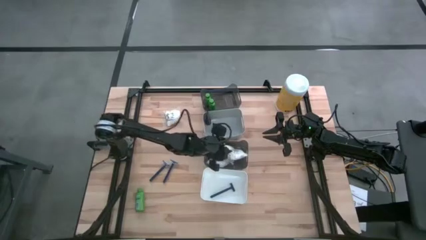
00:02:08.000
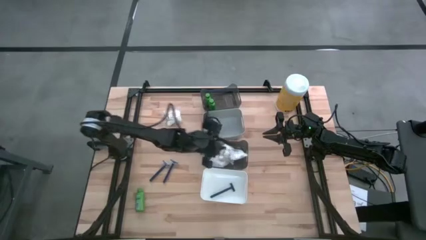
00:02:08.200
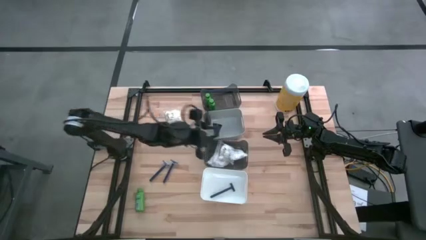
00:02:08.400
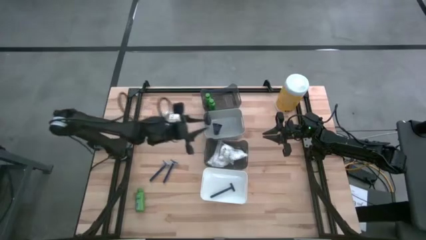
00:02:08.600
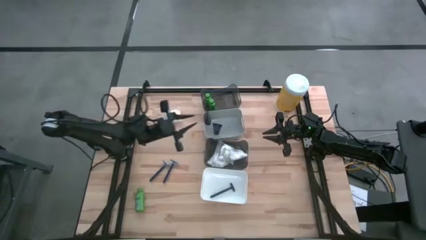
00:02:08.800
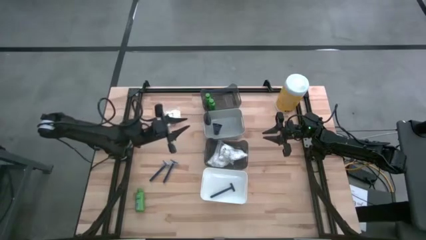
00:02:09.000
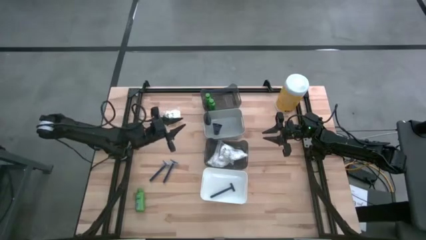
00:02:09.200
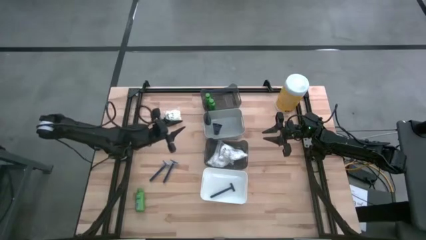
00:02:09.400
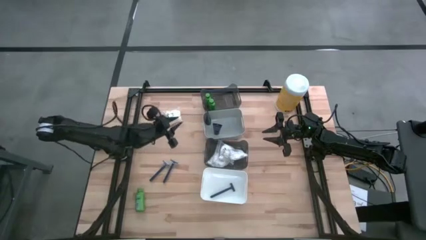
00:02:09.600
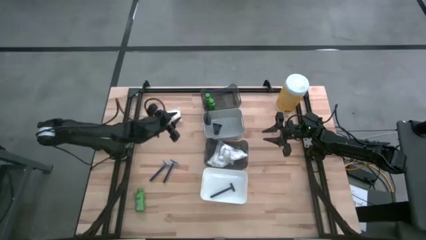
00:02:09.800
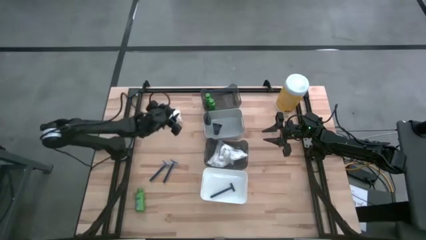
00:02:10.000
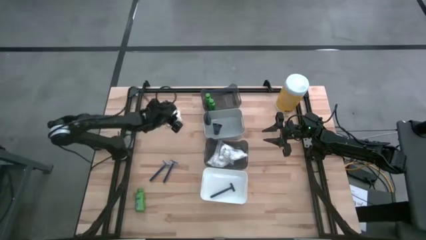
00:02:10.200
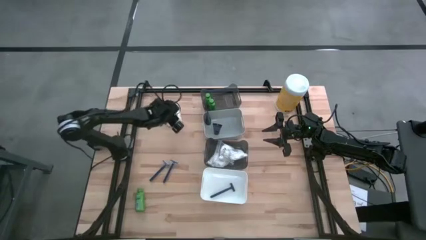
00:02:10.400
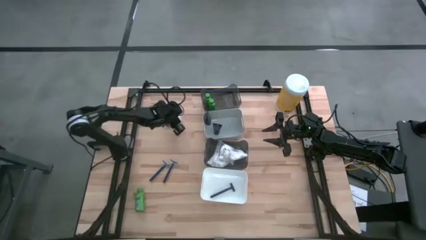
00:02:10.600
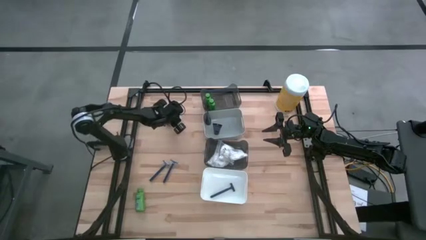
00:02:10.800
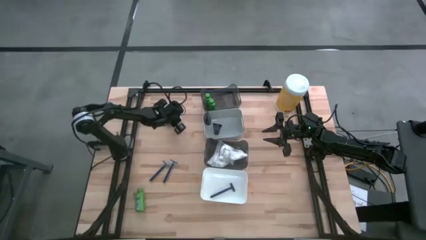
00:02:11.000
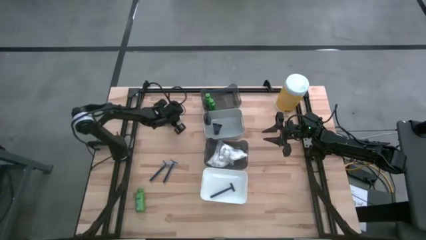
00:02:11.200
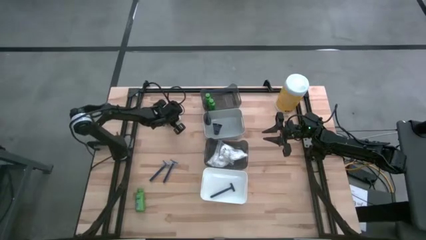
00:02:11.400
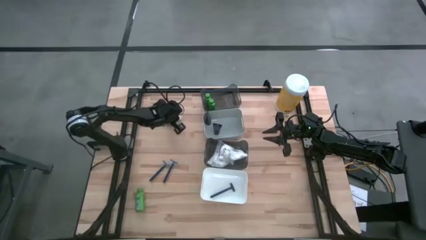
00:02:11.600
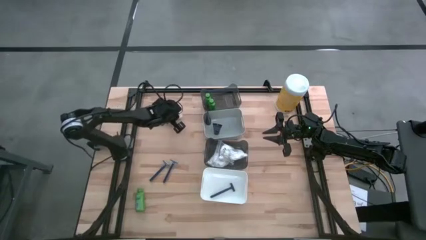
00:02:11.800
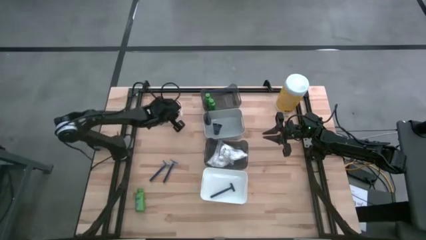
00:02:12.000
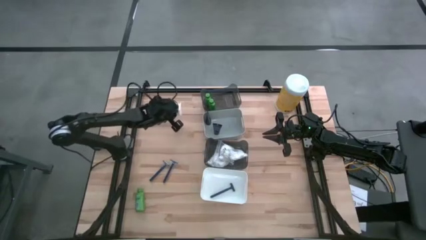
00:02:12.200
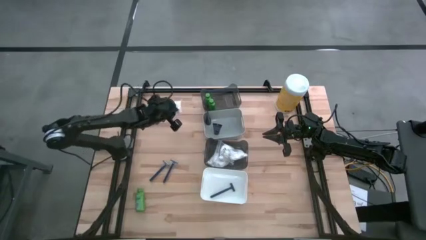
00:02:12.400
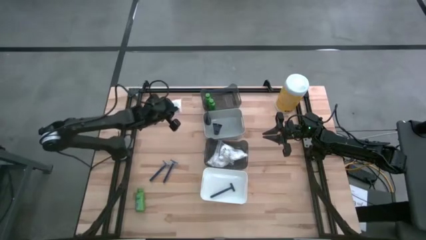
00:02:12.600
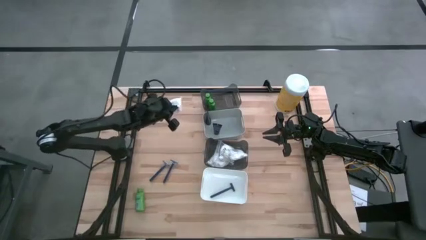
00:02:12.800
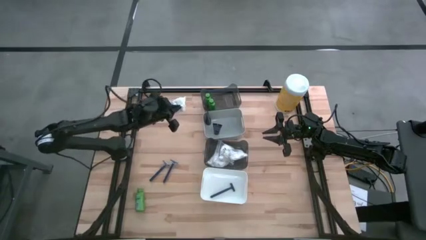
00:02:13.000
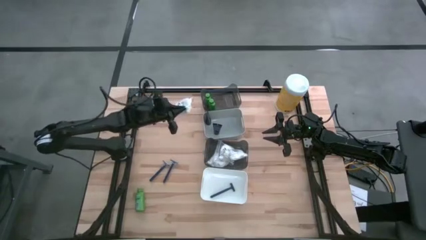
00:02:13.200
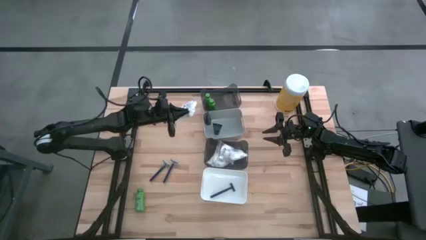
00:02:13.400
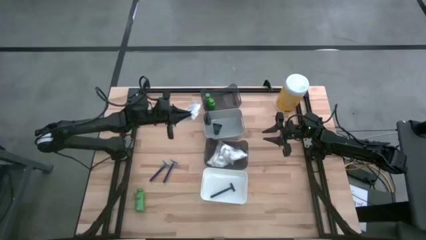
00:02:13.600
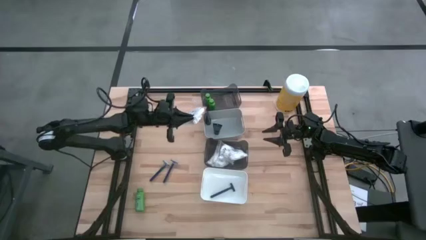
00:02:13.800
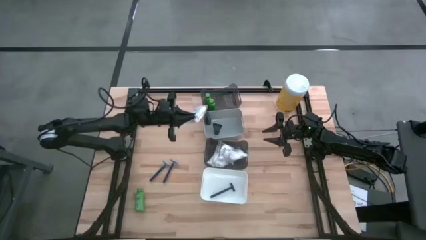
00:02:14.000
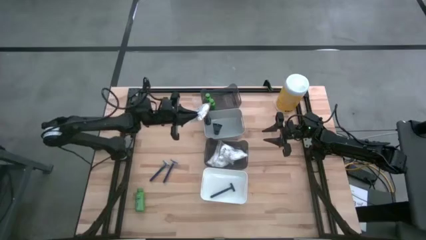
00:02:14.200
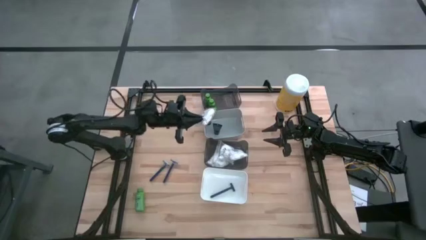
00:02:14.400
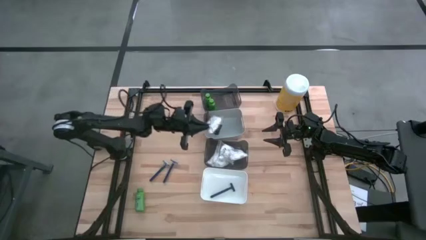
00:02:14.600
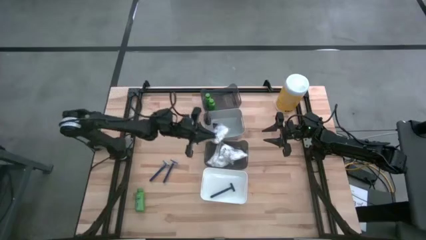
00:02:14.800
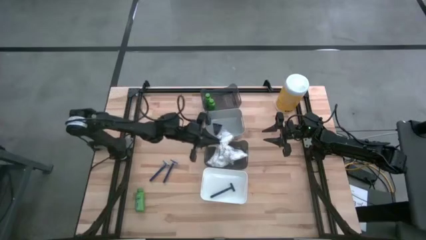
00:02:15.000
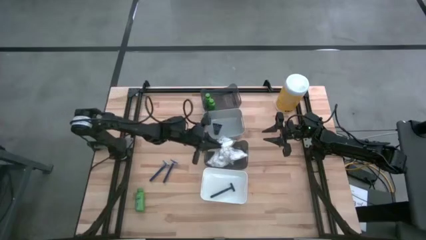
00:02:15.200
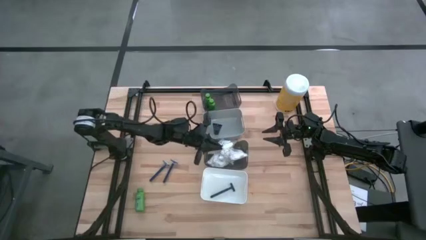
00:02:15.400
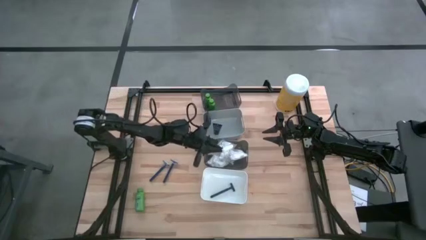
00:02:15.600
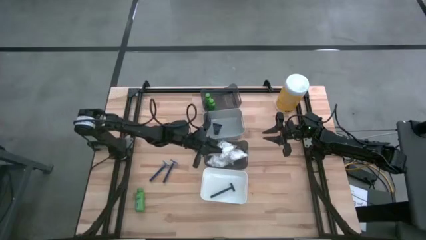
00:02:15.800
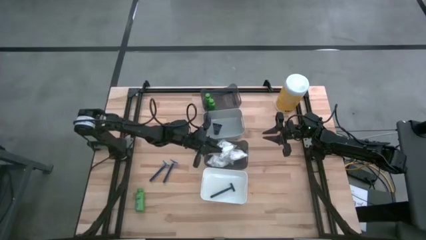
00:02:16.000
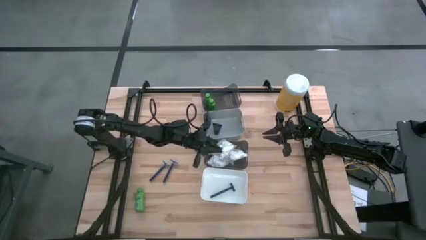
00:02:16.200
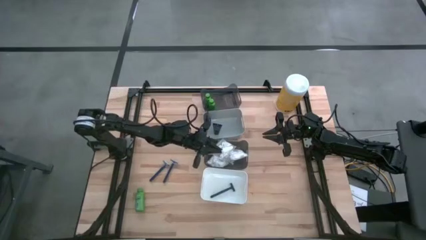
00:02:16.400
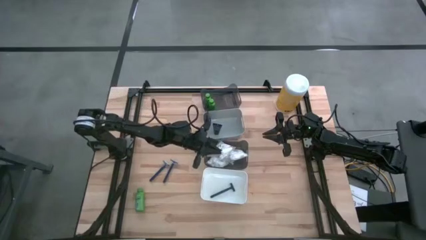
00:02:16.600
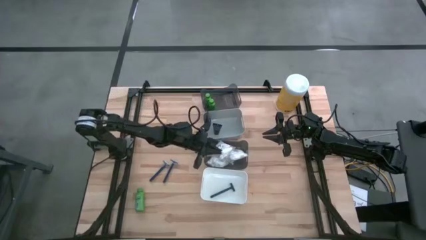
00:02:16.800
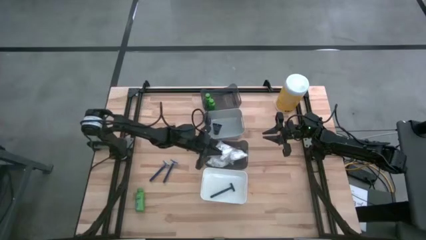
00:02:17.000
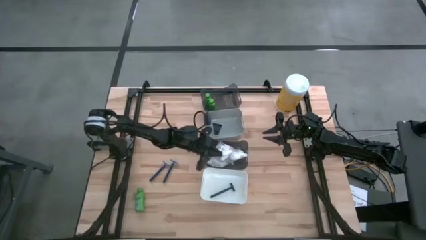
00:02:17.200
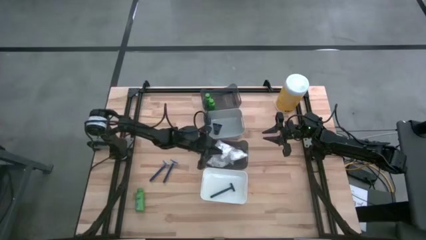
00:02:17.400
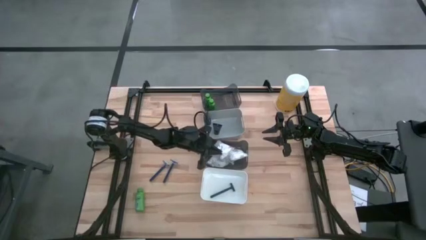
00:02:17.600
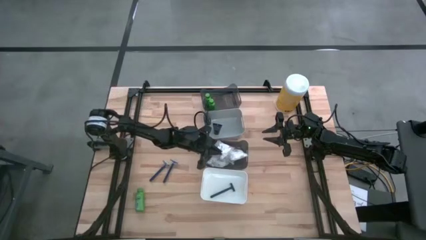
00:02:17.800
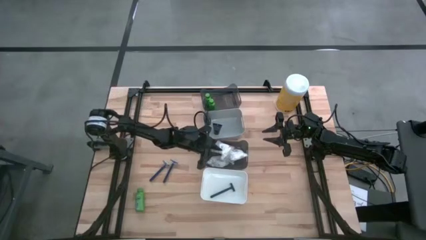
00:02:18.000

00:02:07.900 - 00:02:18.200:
Task: Pick & Place Travel size toiletries
Put the white cotton pack into the bottom black bin

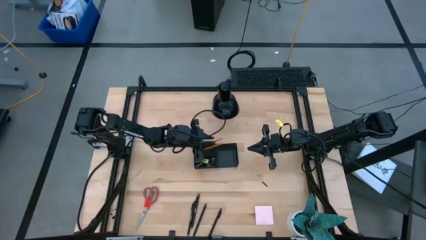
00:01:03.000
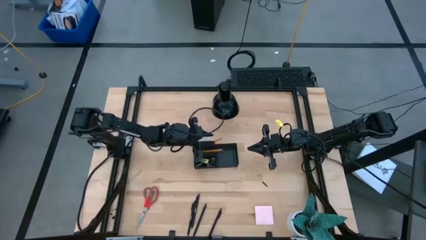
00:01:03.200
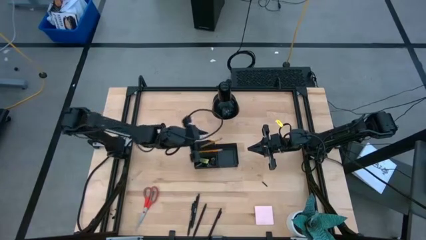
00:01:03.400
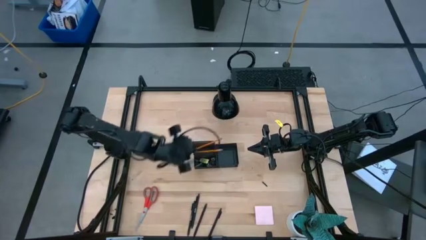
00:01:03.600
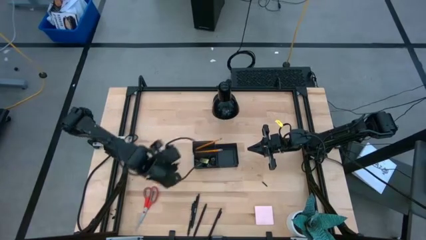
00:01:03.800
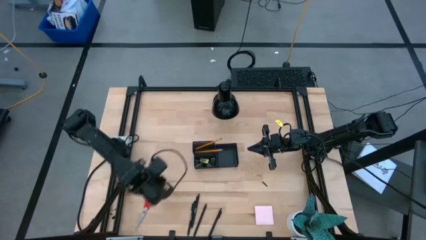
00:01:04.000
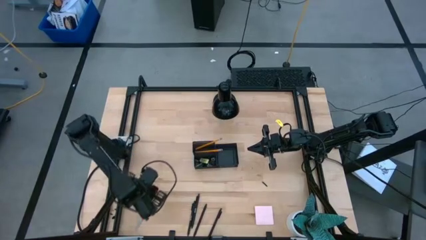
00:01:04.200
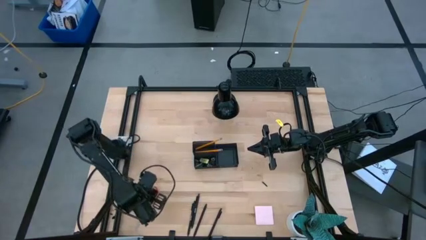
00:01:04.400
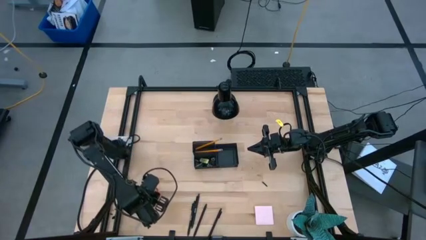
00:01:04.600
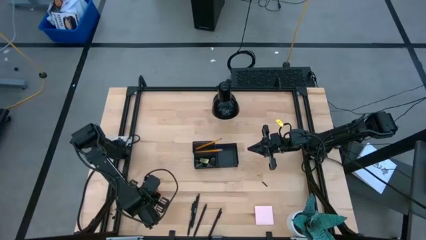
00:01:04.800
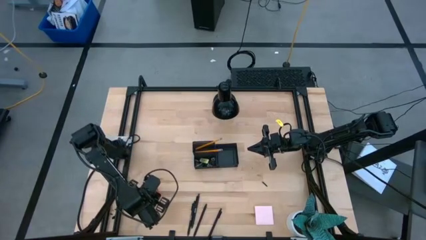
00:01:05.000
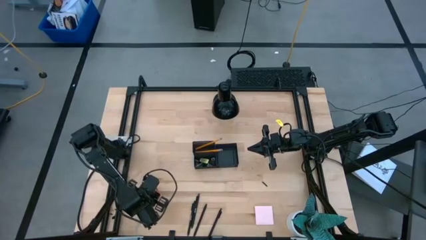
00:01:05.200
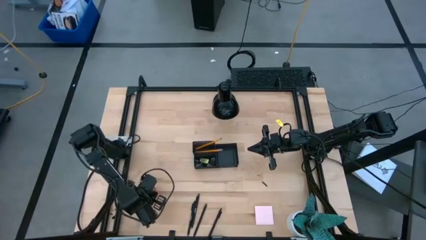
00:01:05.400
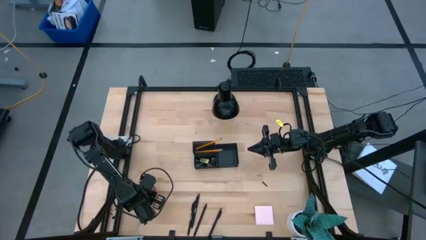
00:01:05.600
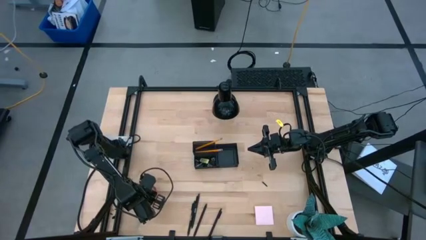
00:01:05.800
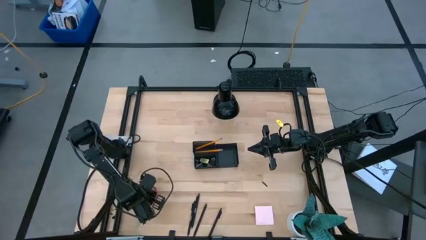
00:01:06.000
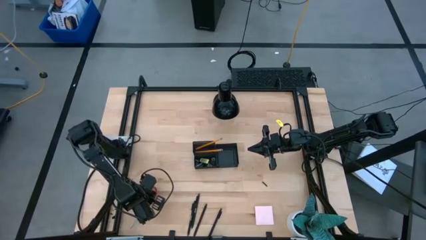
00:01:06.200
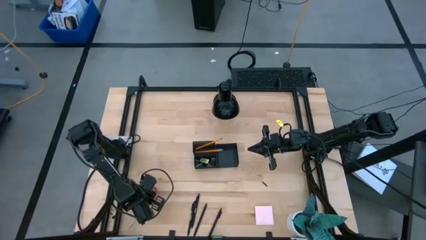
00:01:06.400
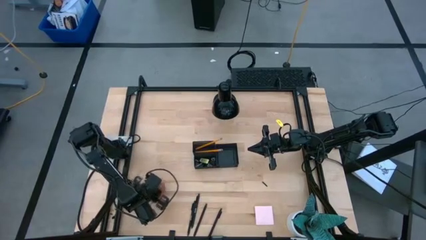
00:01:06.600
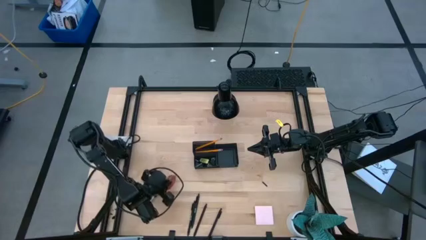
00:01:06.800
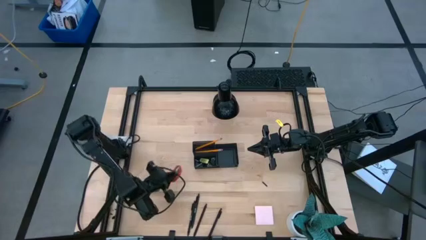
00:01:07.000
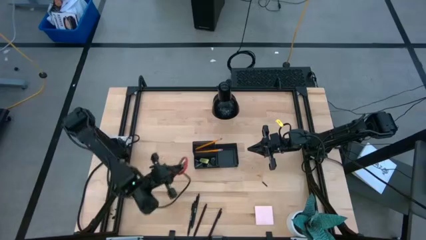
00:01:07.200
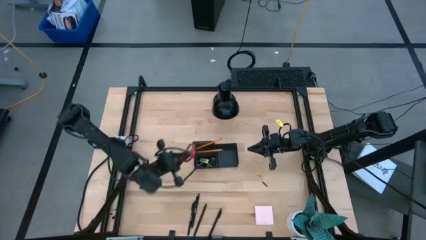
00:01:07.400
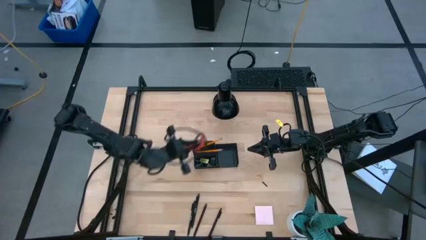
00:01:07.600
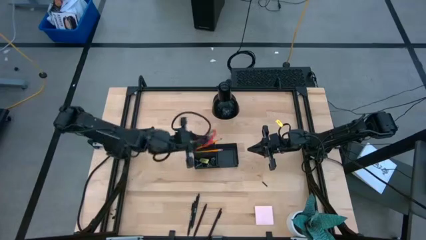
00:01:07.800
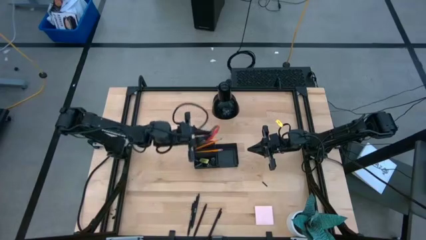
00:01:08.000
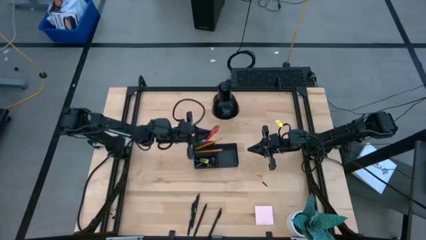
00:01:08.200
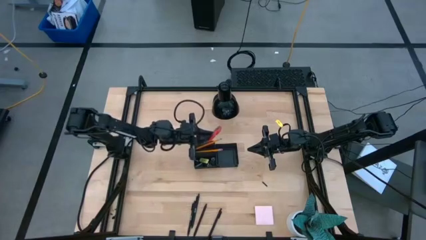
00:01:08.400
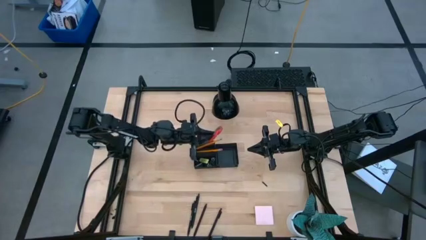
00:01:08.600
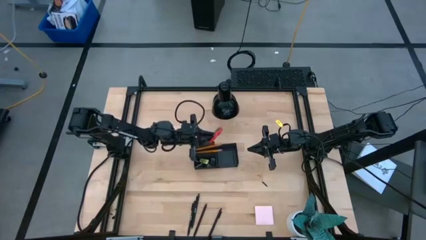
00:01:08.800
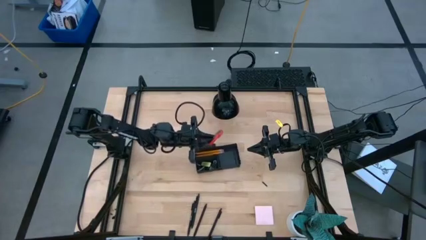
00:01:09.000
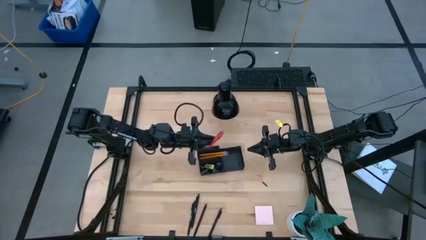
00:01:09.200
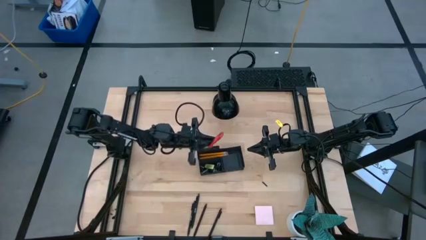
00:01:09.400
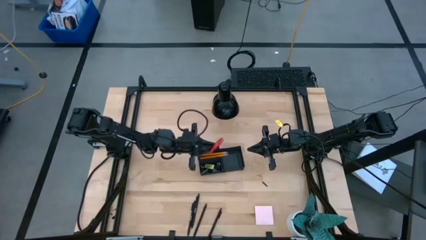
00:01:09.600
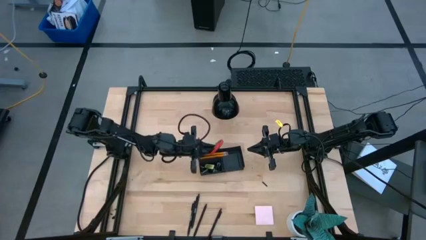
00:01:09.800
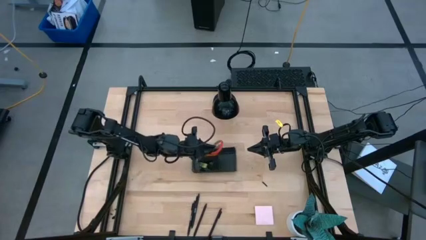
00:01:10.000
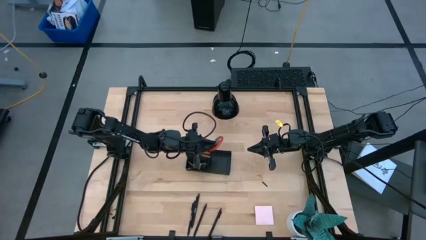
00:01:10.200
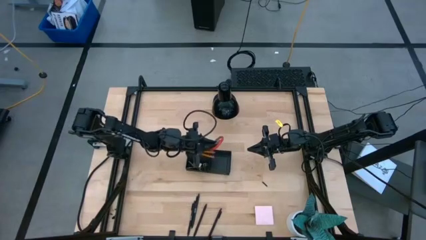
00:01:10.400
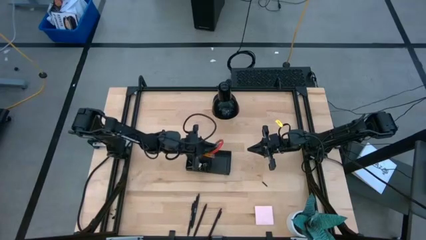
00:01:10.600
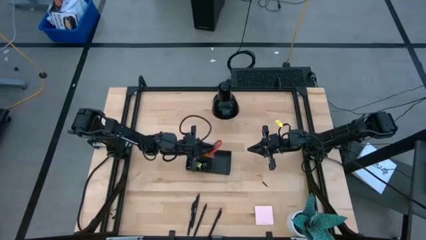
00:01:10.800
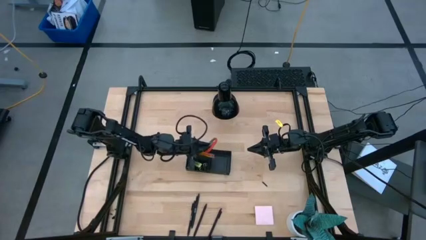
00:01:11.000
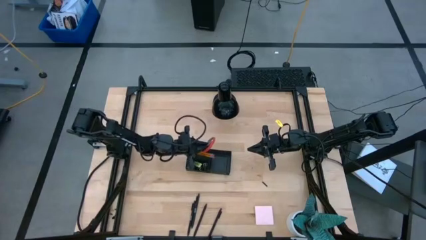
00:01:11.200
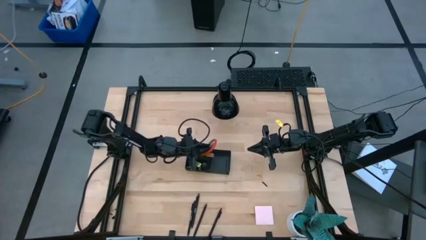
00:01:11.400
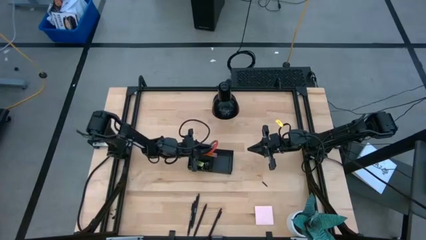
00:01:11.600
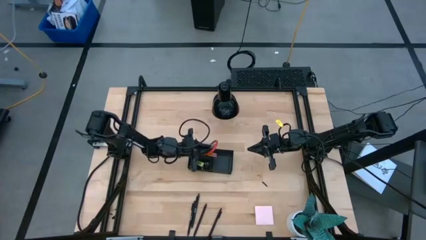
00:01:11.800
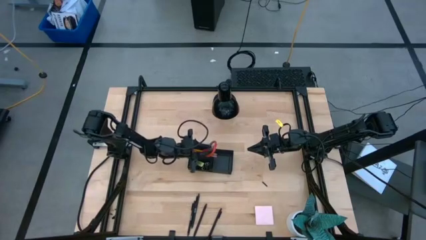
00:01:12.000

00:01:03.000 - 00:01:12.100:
Task: Pick and place office supplies into organizer
Put the scissors into the top left section of the desk organizer
